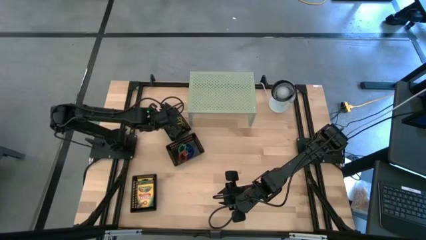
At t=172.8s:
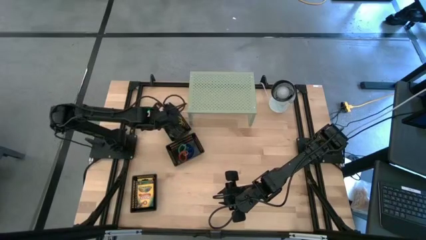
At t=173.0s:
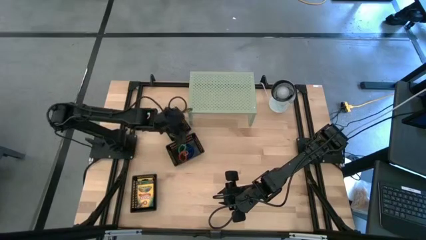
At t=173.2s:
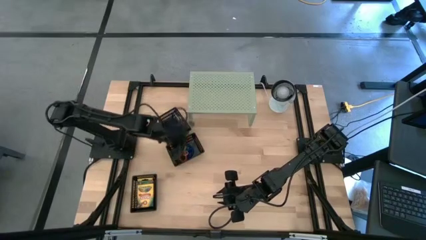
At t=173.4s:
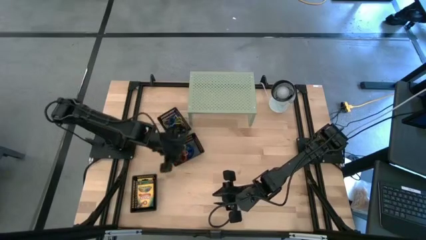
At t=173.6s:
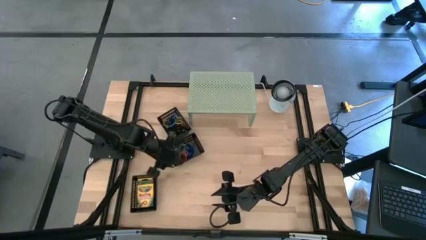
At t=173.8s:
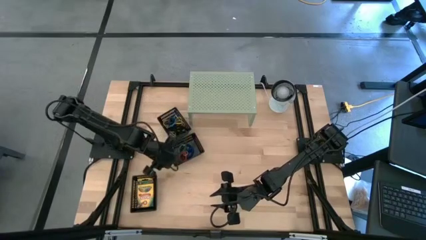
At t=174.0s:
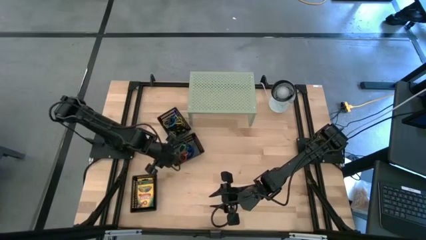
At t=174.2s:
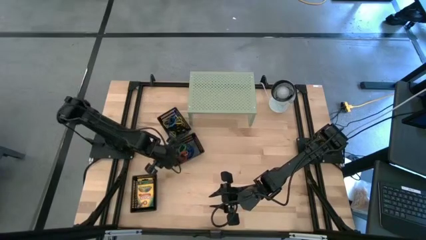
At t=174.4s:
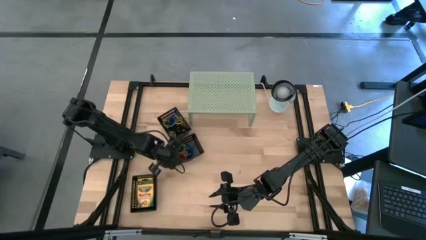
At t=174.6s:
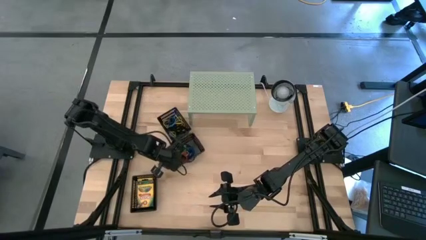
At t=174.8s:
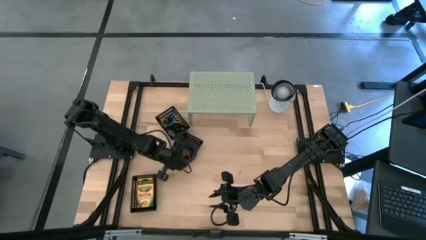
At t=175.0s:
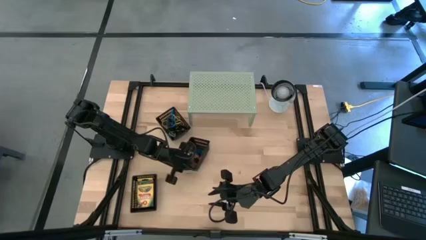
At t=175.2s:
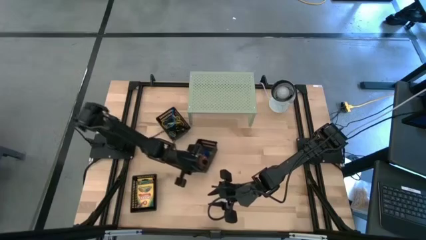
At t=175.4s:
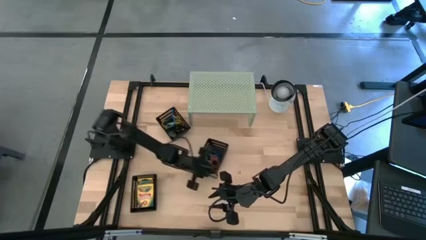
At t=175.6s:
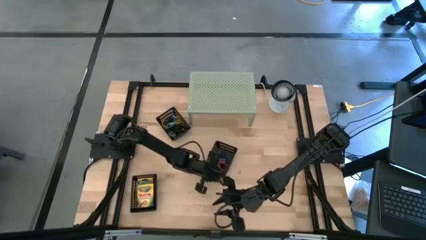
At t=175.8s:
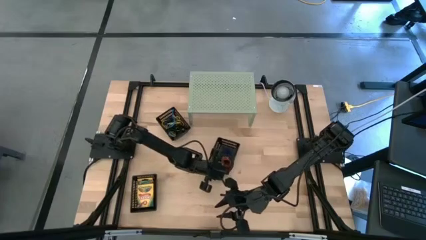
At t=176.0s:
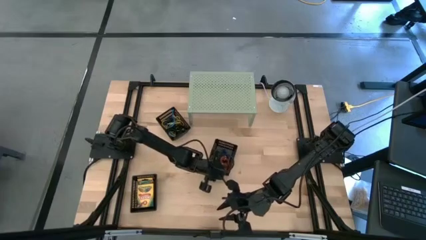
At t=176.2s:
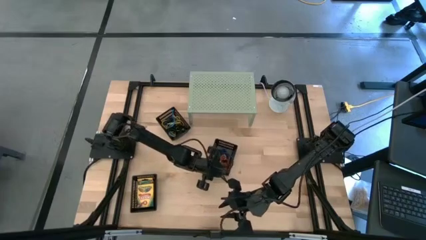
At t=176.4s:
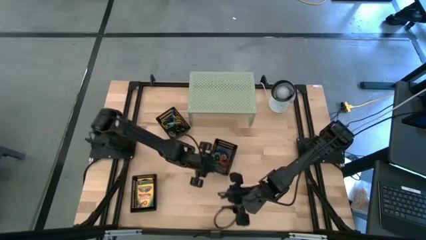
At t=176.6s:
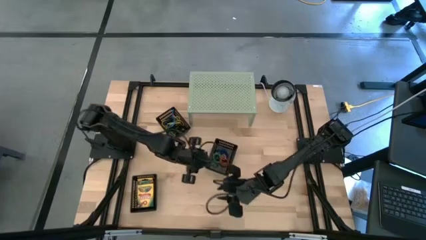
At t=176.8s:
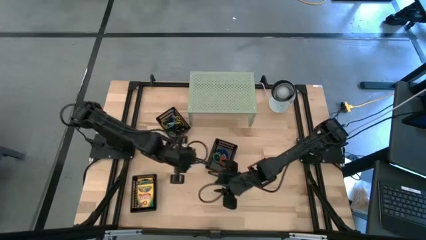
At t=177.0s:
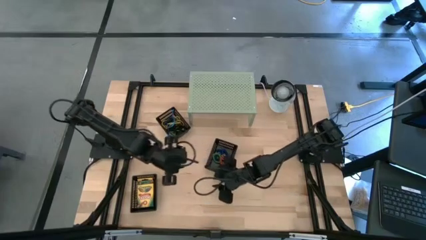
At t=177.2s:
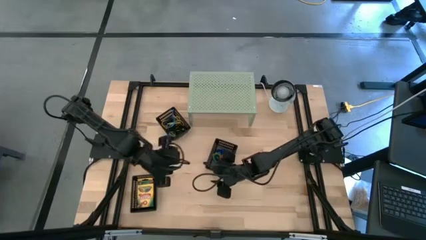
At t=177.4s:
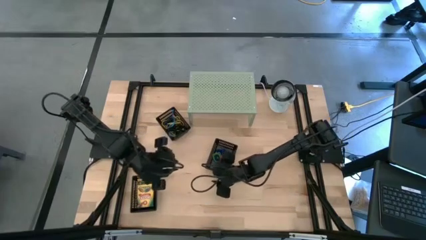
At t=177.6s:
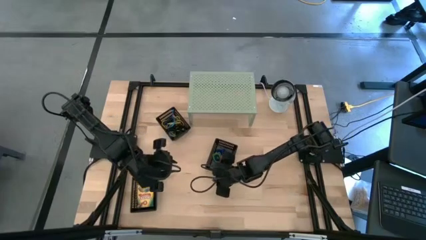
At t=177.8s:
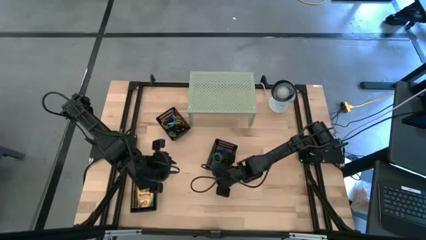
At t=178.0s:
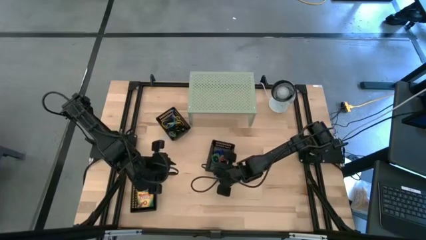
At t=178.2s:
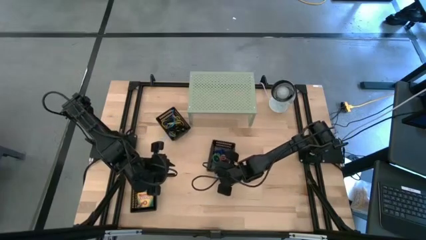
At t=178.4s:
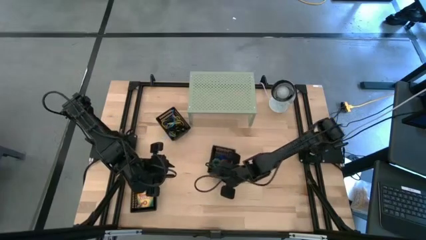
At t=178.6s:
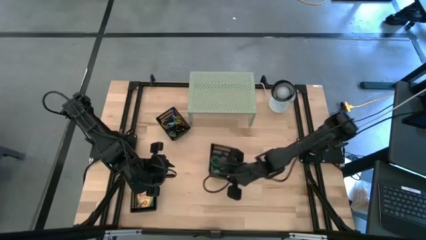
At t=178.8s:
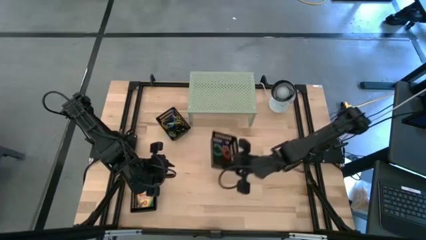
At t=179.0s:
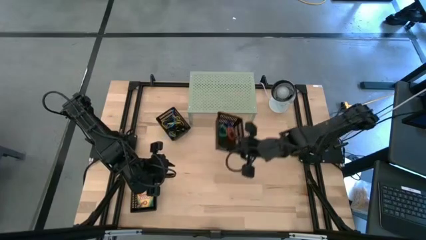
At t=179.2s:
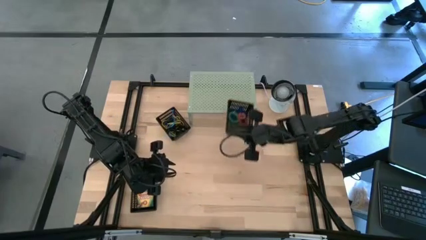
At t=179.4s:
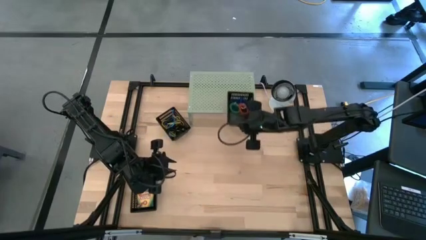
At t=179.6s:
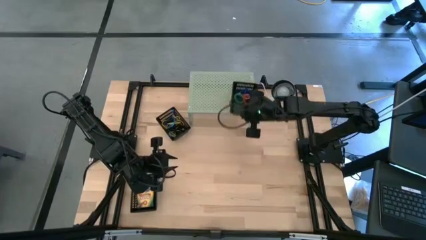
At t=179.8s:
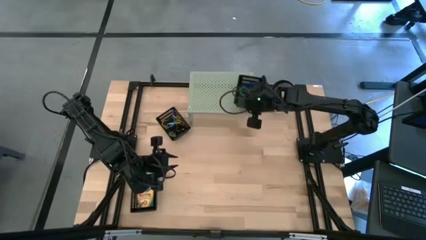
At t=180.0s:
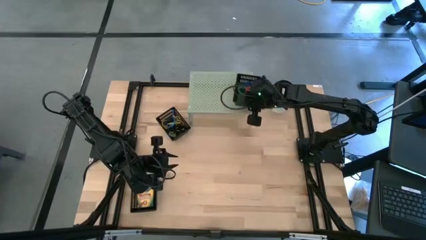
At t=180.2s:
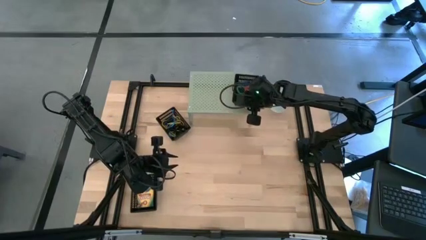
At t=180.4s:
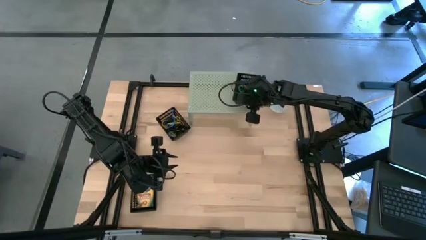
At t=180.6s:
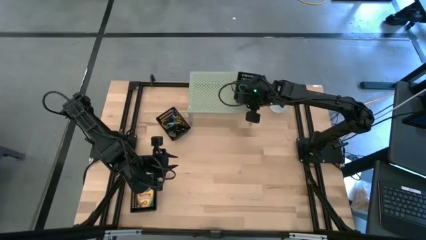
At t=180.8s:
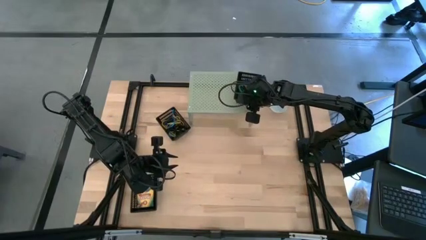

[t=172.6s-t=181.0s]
Task: Pick & Place Office Desk Supplies
Put the middle black bin on the shelf

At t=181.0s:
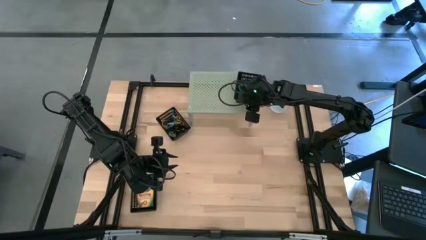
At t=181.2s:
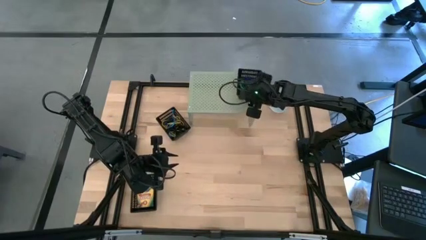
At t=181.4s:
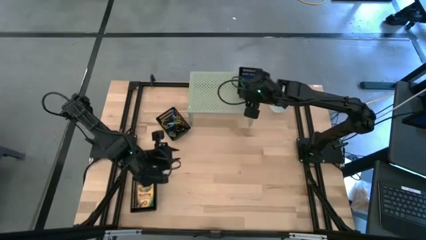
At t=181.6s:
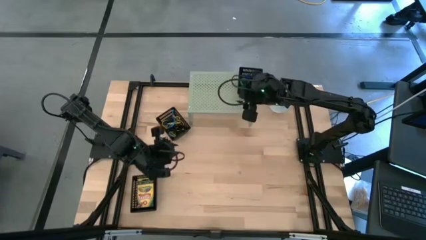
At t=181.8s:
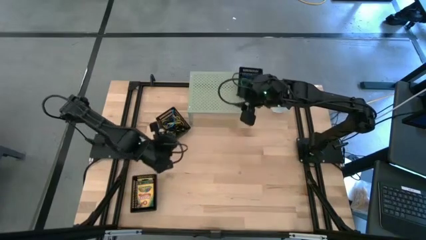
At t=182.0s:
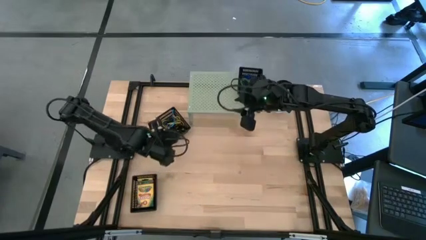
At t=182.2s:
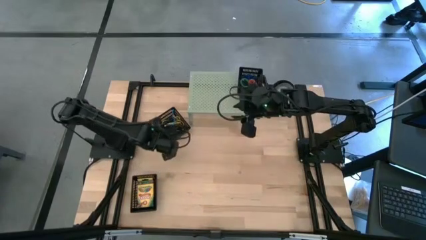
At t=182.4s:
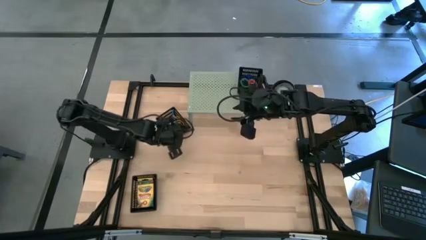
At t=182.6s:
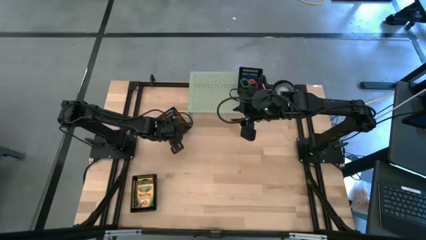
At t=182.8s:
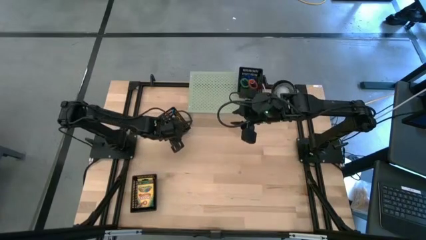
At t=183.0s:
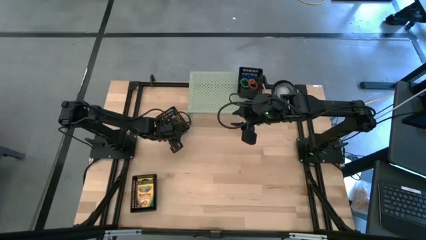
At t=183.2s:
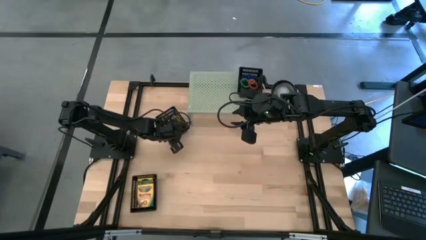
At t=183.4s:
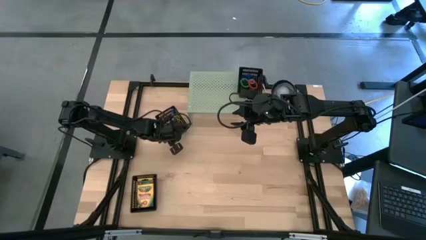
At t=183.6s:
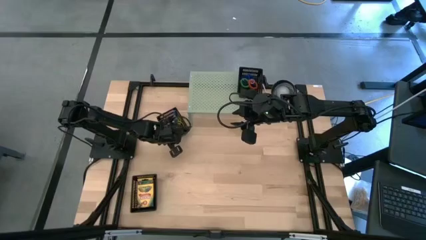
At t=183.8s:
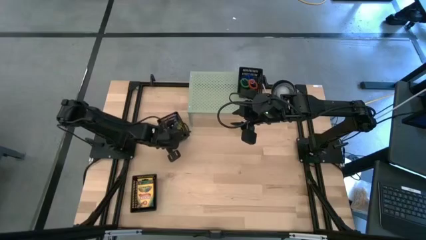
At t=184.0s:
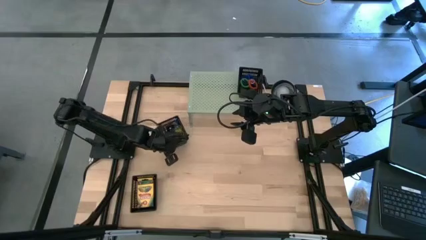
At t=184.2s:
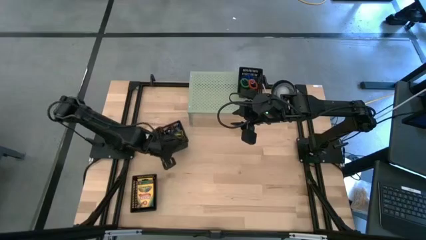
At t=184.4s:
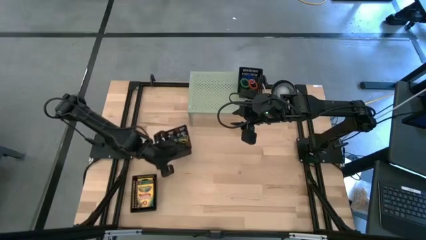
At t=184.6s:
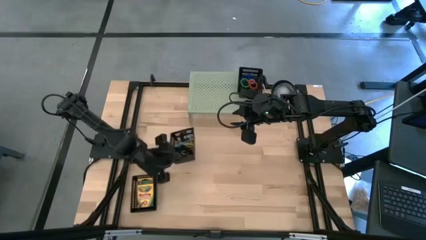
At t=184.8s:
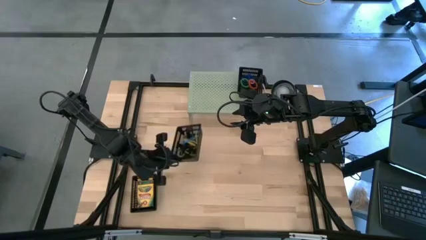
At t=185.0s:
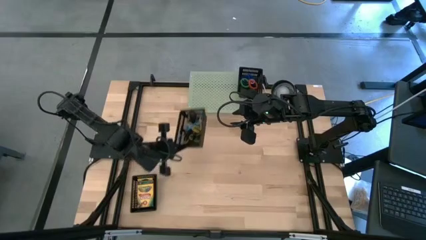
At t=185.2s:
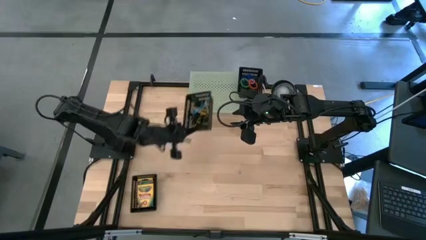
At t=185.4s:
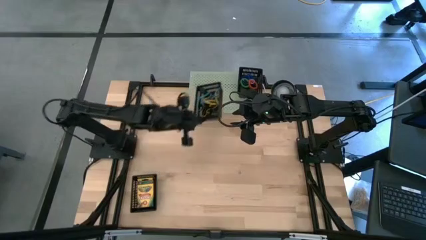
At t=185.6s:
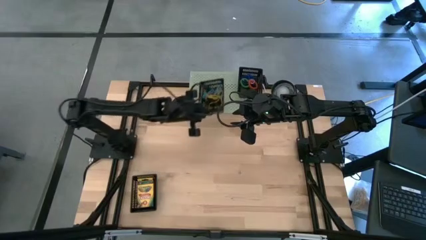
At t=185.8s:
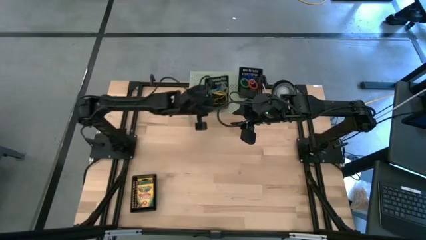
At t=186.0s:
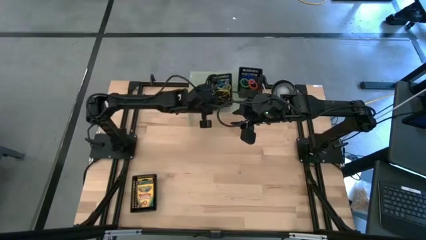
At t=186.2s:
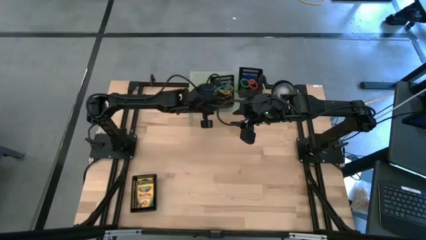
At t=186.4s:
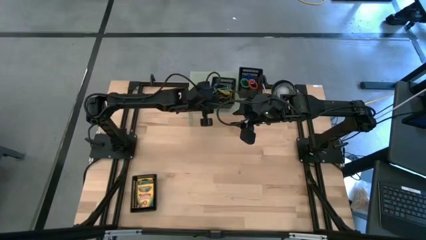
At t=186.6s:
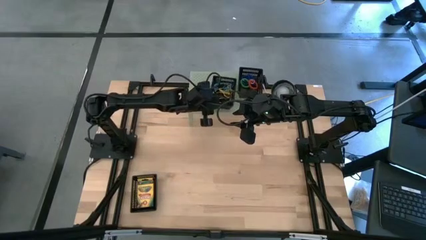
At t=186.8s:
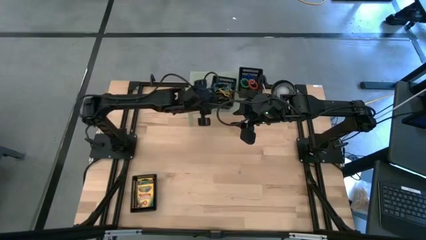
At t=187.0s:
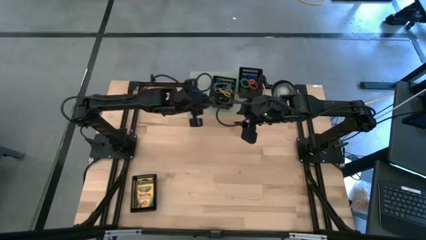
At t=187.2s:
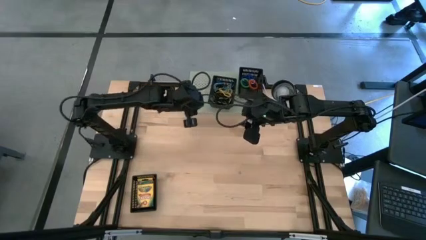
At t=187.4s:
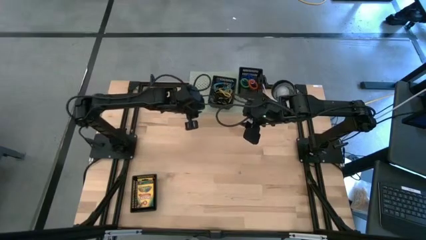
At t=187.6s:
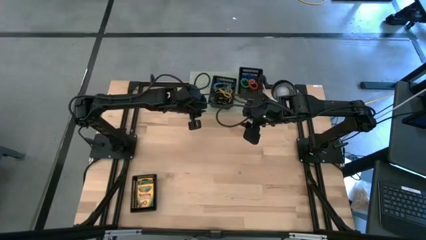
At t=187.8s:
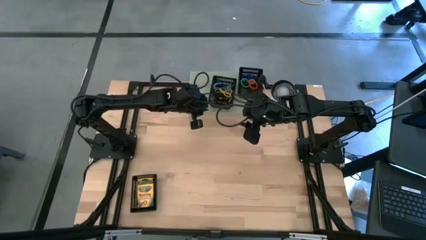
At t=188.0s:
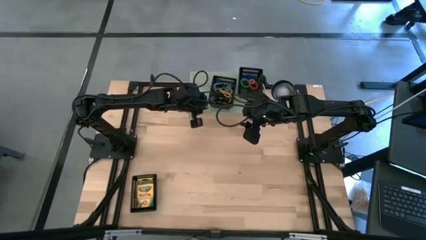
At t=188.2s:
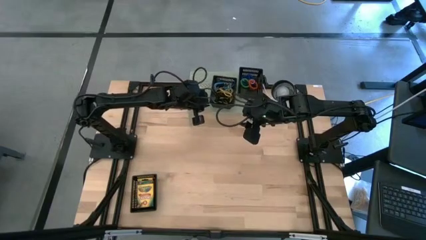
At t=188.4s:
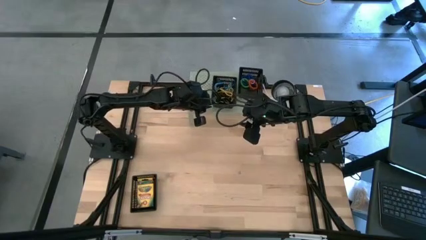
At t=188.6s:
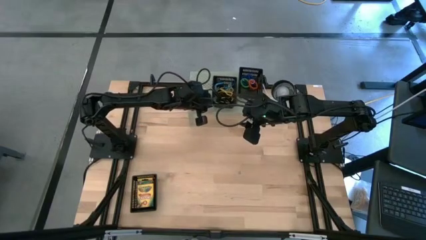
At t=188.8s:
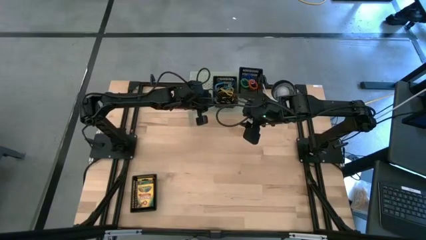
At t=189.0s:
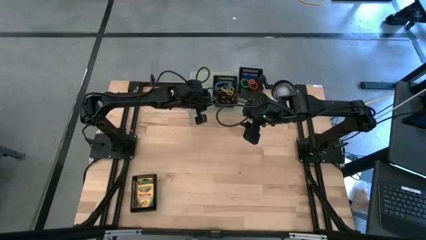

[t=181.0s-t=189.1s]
Put the top black bin on the shelf
